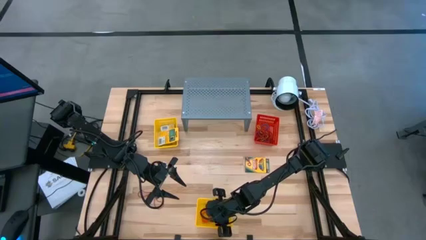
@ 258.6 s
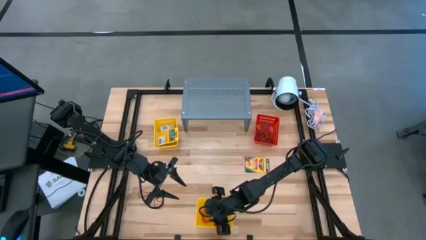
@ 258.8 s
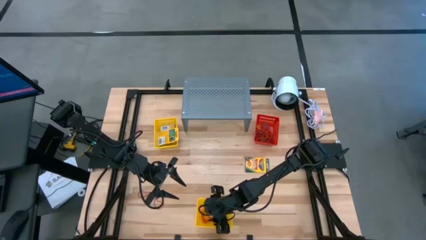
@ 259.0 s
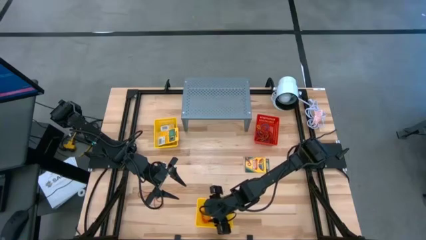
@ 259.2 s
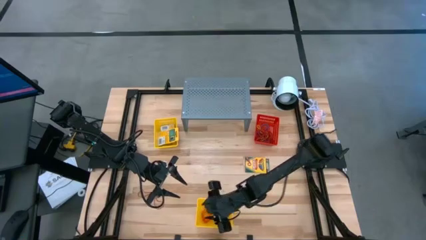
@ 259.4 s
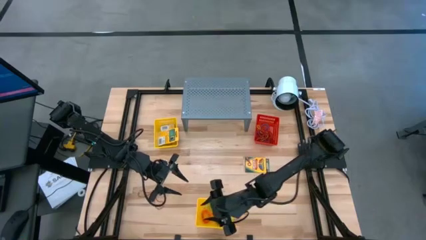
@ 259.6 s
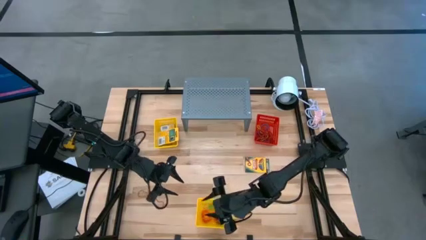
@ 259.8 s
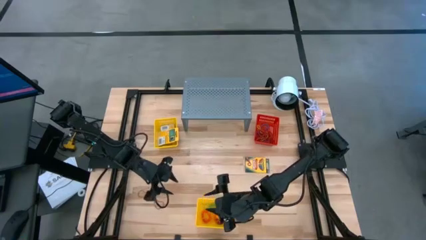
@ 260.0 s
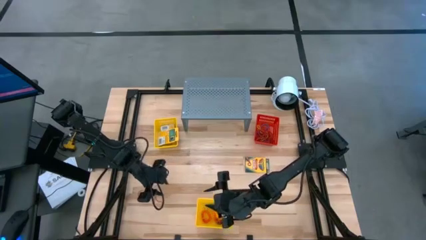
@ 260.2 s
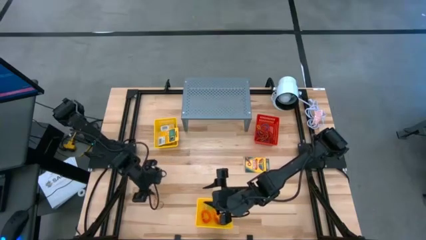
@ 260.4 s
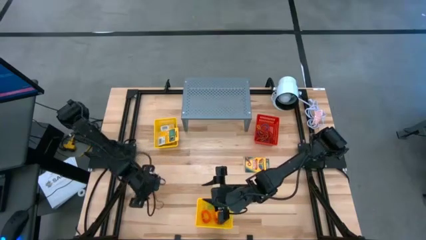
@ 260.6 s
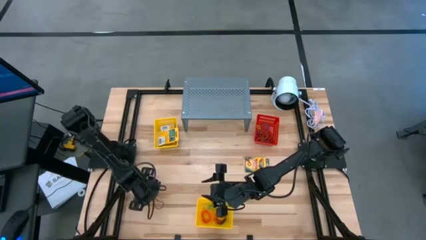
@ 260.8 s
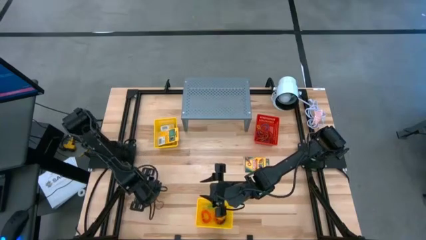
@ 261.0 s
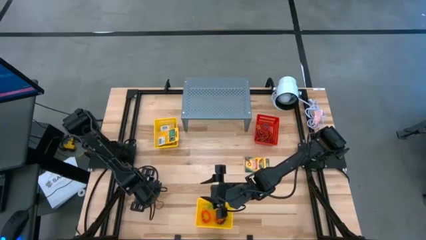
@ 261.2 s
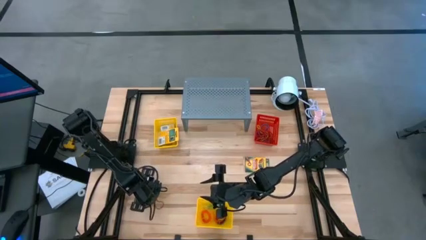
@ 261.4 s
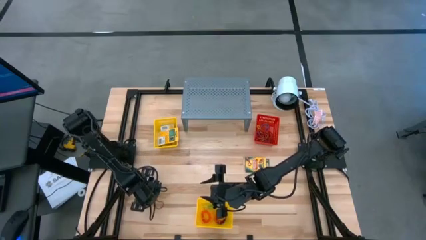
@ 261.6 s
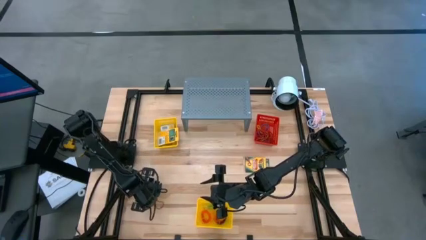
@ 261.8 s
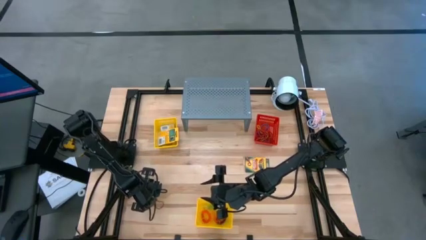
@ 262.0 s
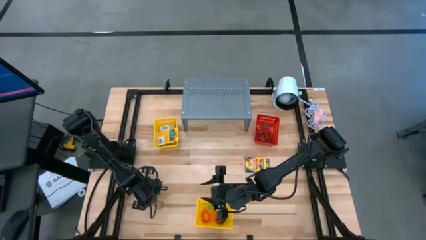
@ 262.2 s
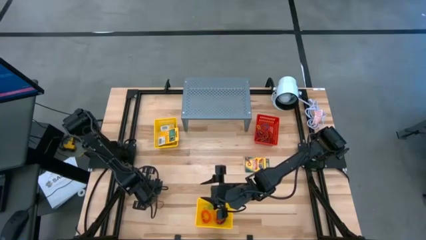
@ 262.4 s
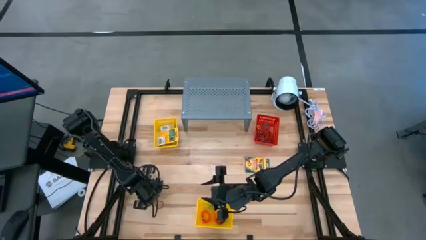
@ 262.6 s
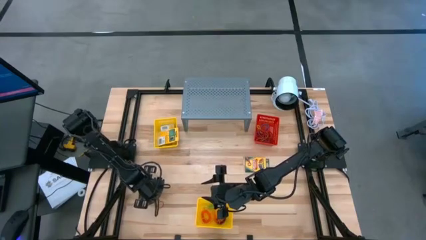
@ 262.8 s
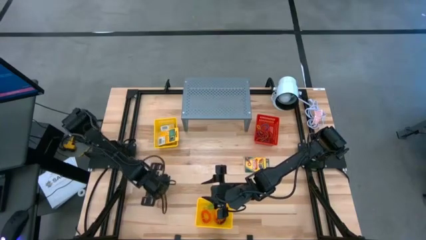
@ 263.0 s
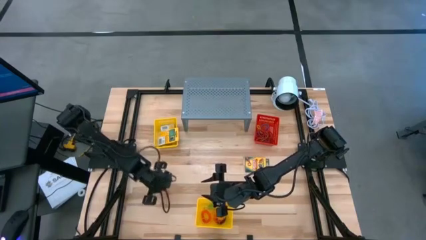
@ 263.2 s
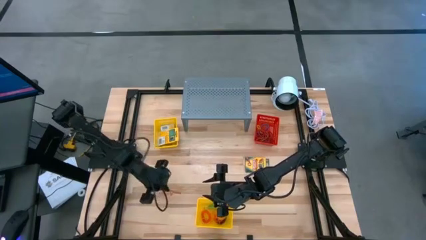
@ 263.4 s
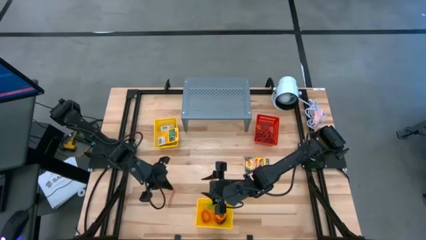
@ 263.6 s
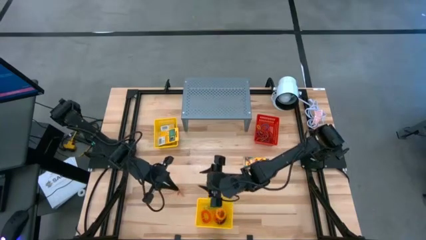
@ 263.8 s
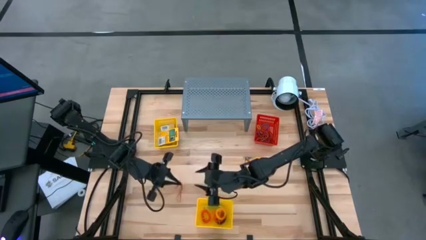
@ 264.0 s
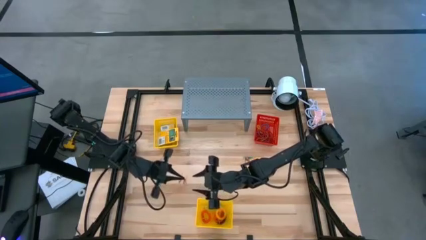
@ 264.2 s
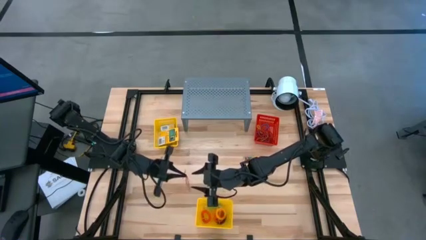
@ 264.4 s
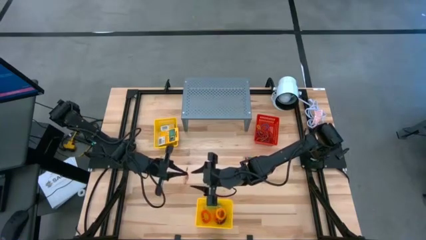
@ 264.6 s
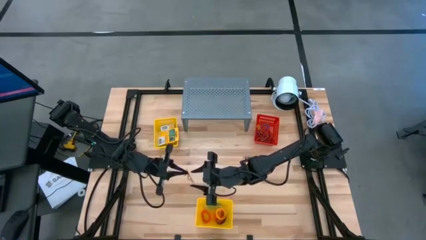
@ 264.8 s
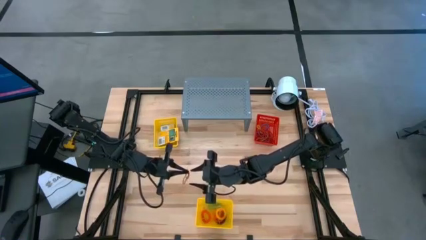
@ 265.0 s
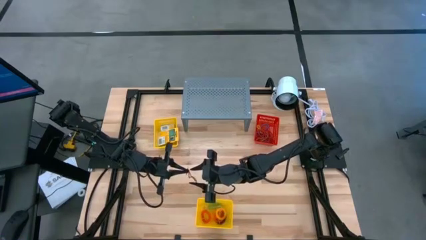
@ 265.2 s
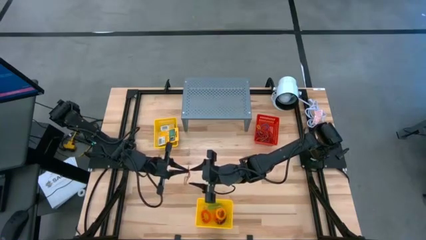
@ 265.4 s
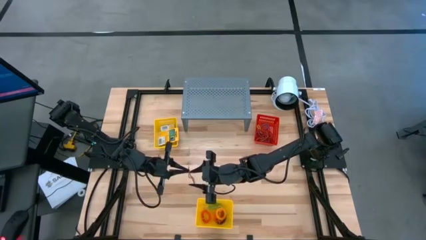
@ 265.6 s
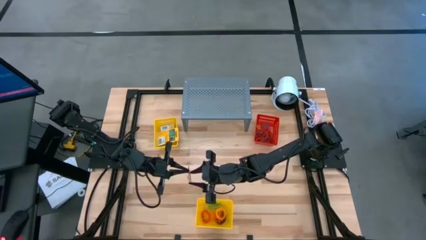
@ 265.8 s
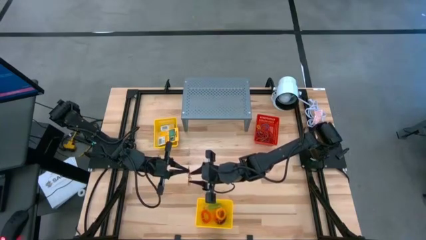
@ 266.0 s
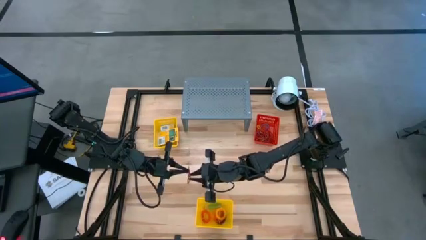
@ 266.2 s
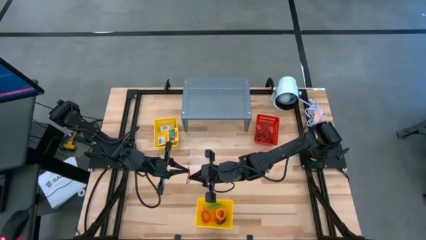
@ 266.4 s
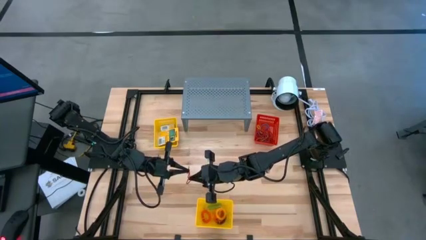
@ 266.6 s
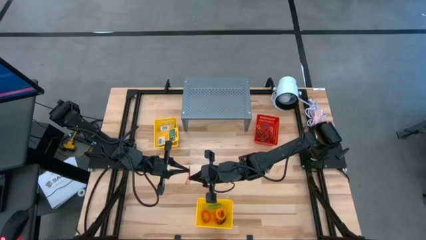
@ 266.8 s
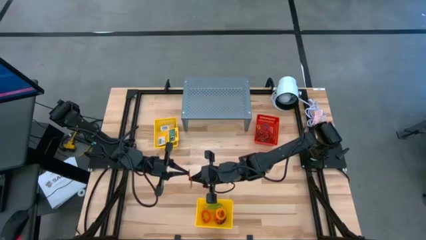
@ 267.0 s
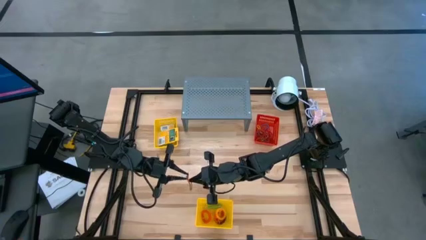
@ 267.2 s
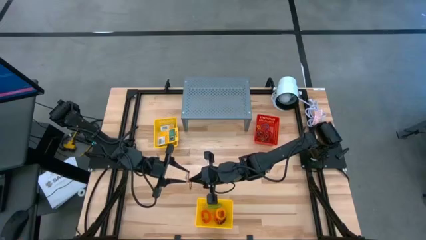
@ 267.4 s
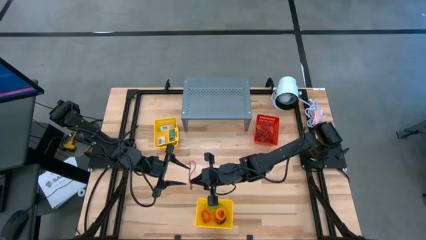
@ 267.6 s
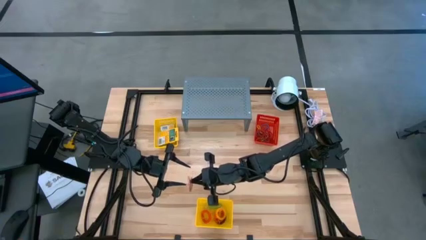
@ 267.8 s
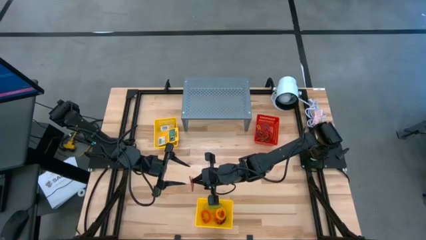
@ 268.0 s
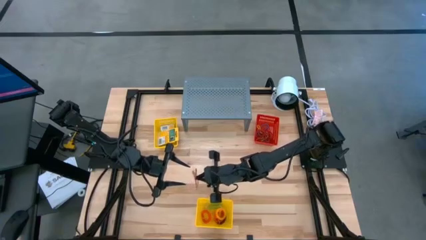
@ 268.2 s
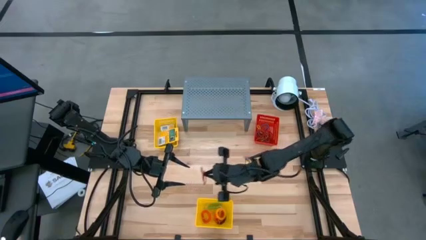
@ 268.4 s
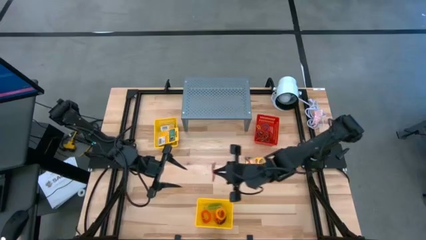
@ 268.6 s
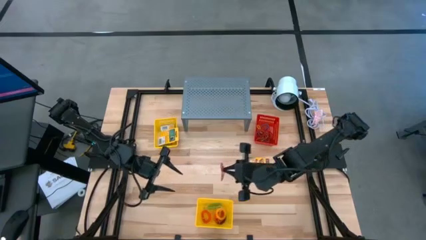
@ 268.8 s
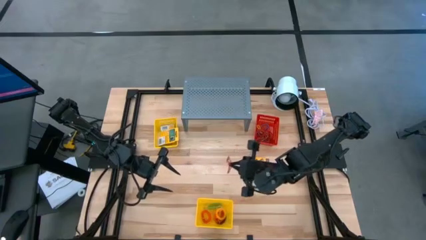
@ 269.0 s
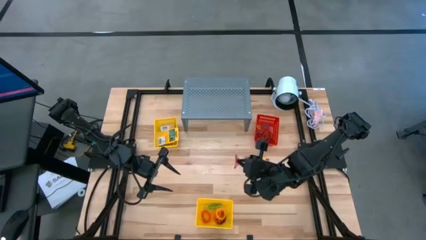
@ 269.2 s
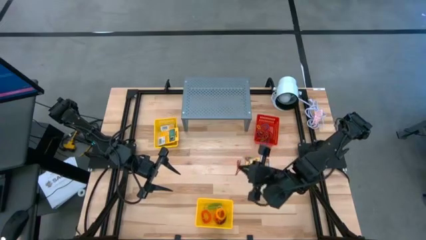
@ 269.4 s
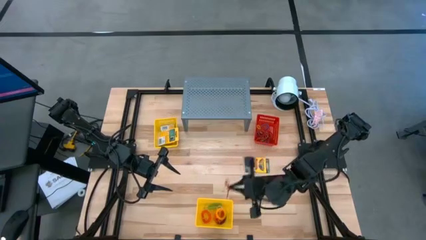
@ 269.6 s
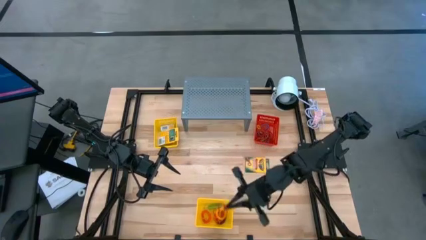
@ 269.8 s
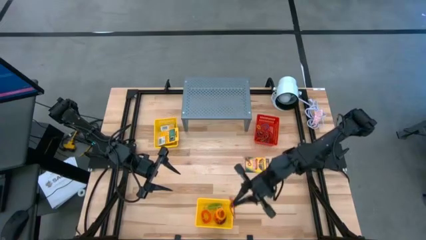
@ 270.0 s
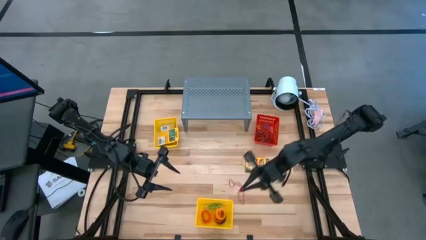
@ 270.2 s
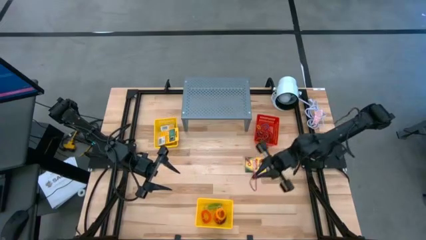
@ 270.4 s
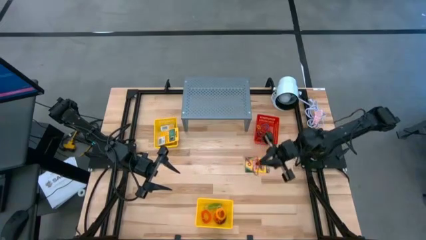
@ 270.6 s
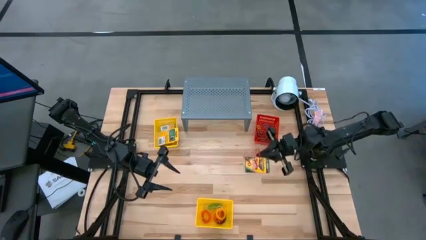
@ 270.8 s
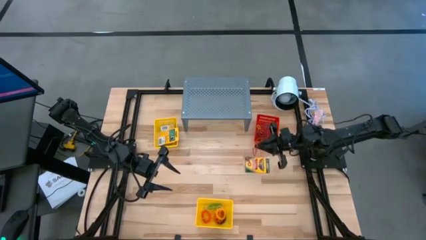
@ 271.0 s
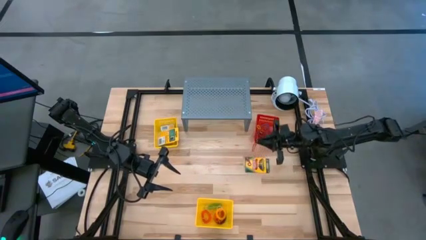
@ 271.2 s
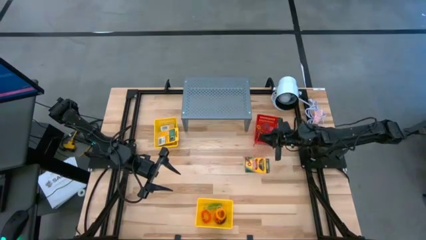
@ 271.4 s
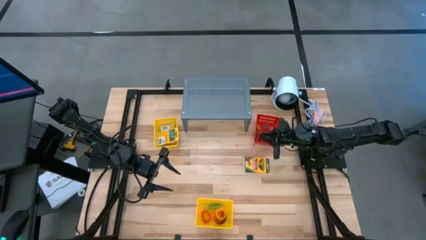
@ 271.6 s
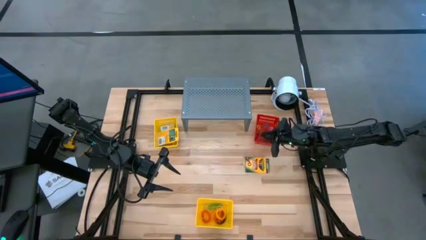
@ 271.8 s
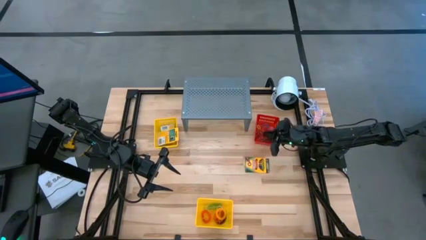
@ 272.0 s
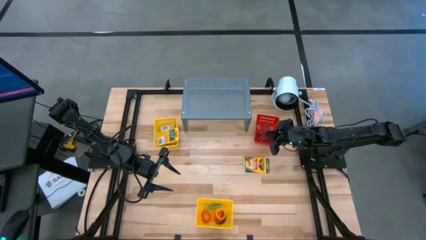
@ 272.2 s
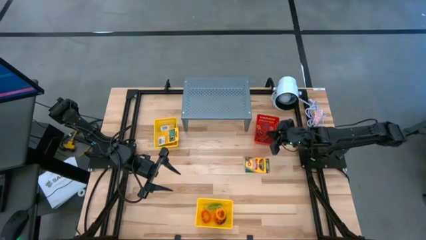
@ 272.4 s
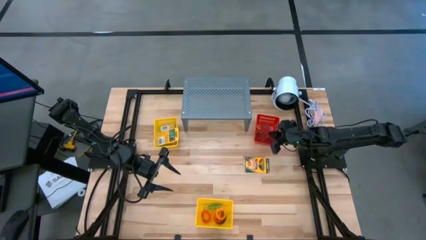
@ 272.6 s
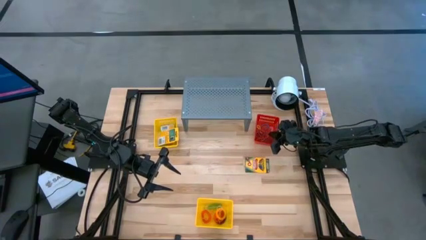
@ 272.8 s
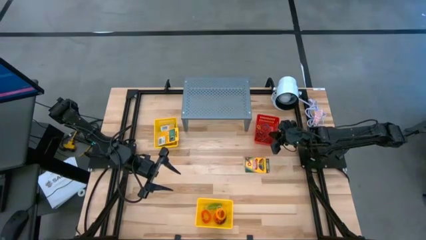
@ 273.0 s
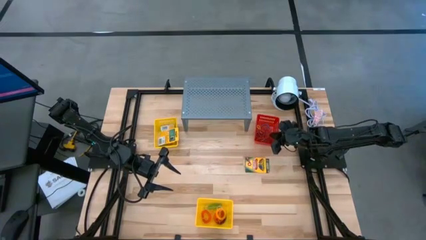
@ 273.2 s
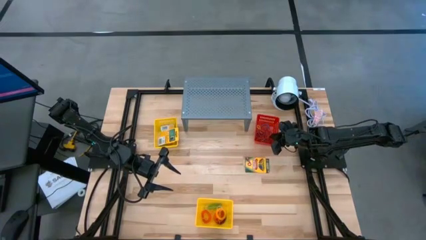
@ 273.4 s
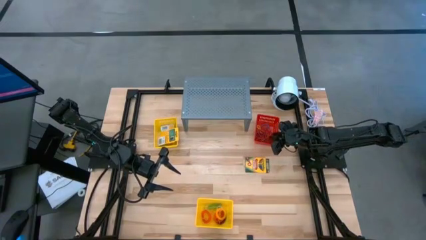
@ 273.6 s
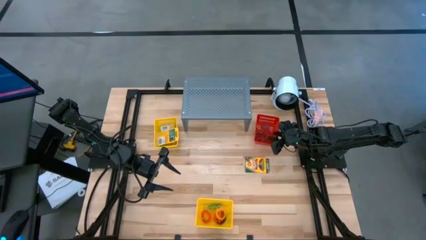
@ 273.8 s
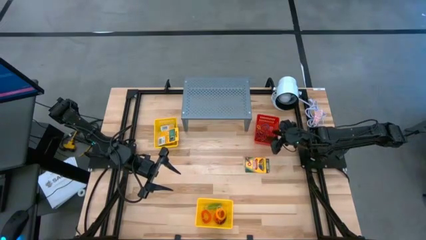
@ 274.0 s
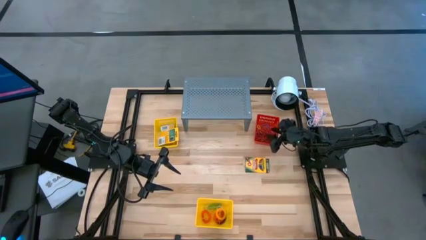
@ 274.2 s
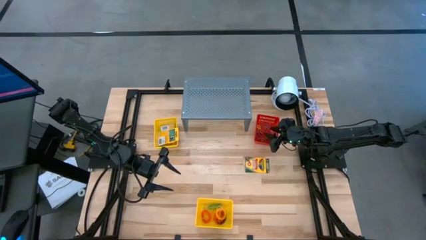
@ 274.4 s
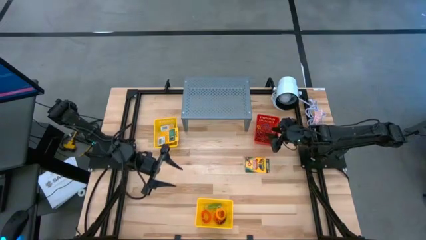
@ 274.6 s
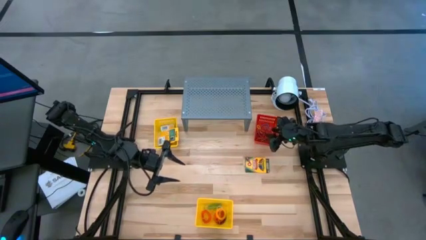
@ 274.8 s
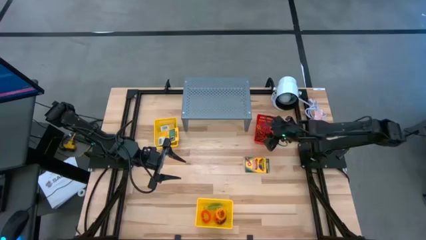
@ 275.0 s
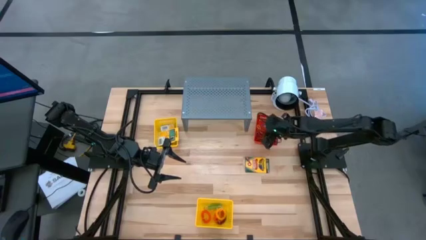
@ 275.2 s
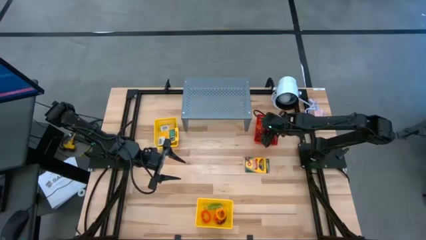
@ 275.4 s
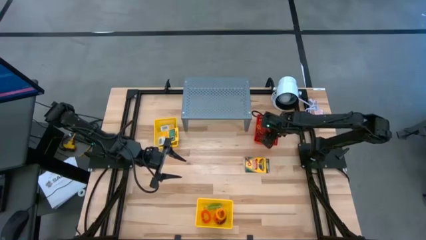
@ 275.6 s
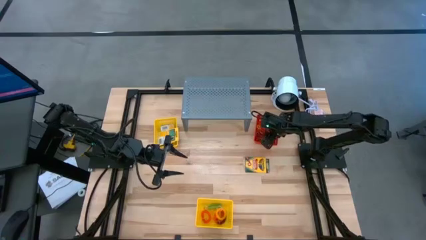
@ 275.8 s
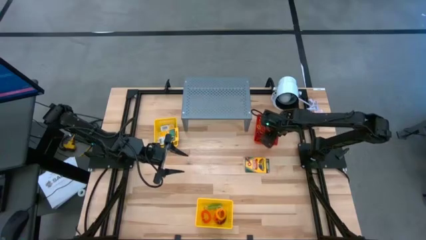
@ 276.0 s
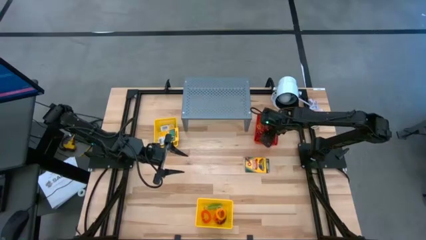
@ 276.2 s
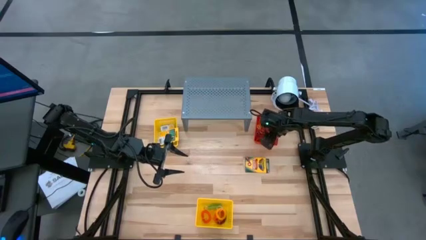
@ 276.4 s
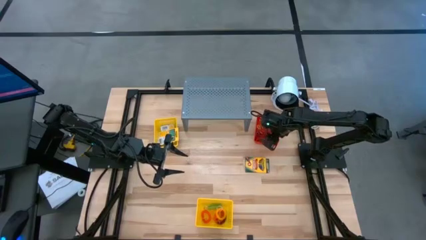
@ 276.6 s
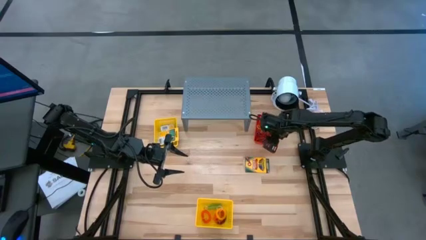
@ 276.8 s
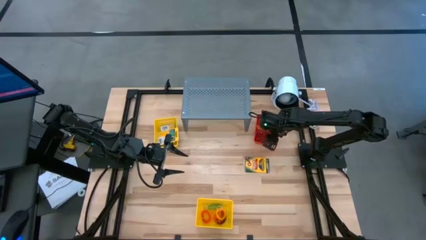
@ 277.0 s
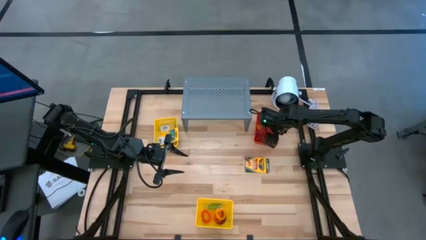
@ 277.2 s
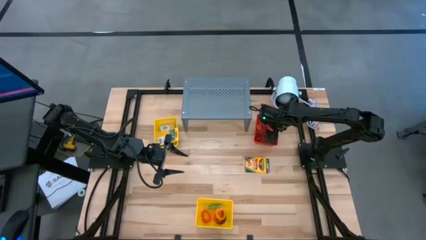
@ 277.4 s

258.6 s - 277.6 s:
Task: Pick & Place Office Desk Supplies
Put the red rubber band into the red bin
